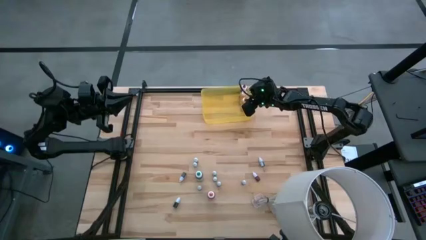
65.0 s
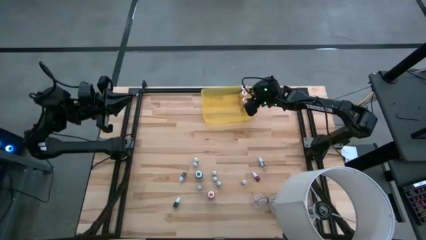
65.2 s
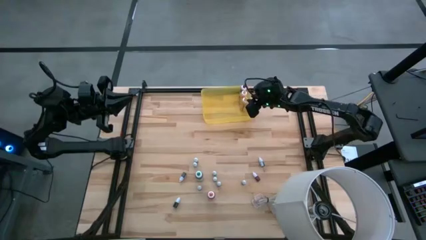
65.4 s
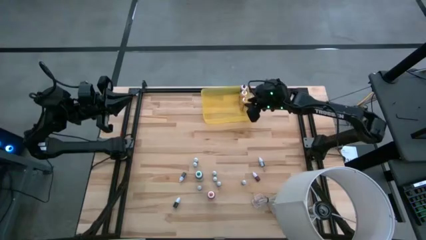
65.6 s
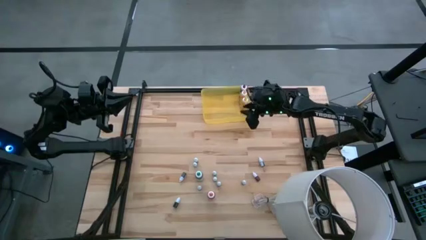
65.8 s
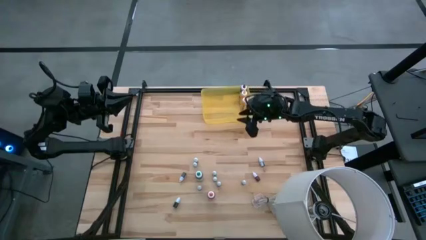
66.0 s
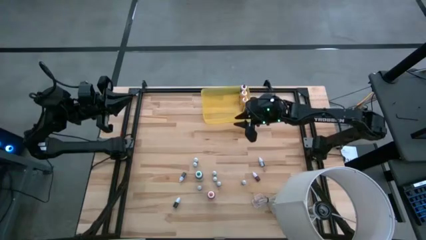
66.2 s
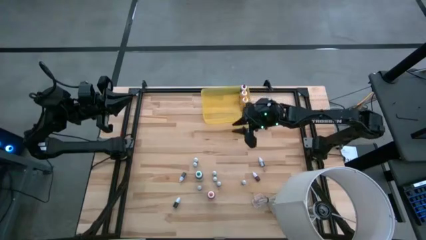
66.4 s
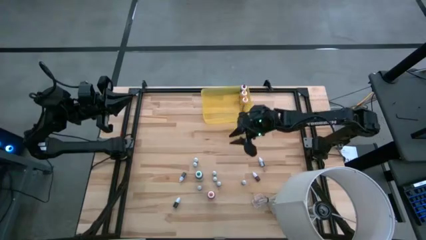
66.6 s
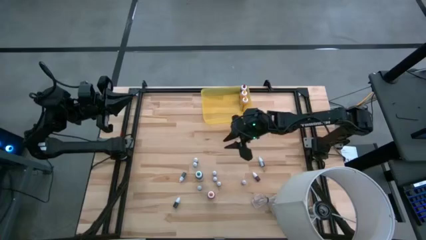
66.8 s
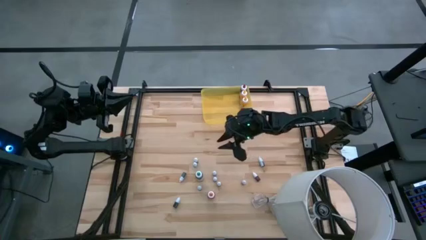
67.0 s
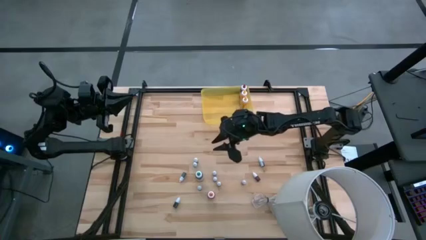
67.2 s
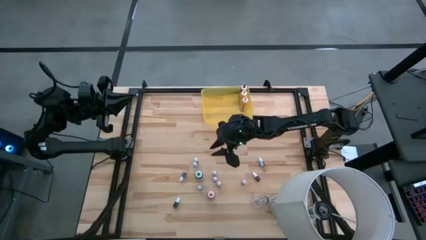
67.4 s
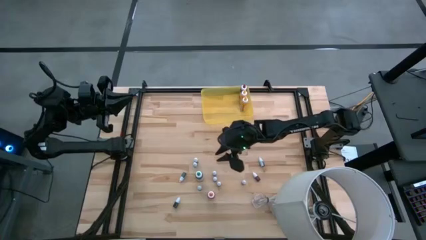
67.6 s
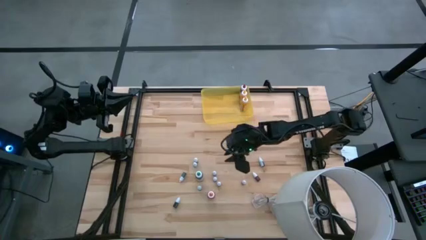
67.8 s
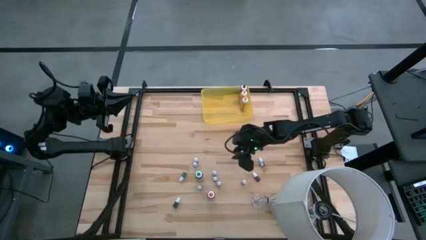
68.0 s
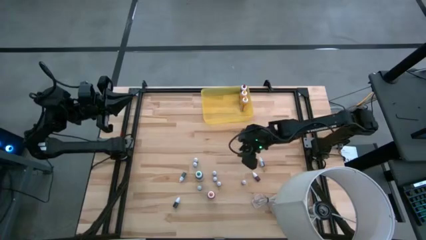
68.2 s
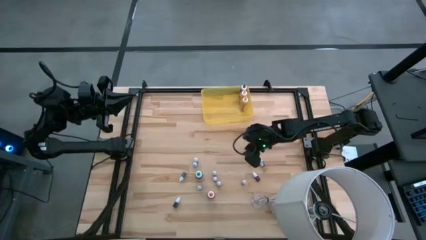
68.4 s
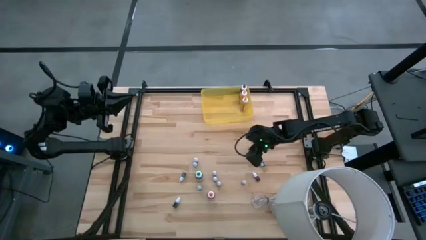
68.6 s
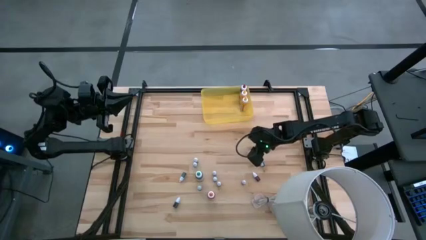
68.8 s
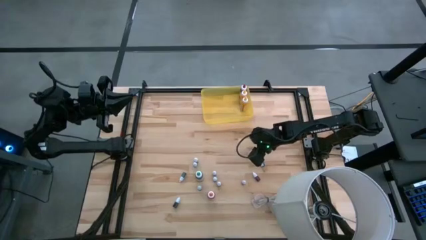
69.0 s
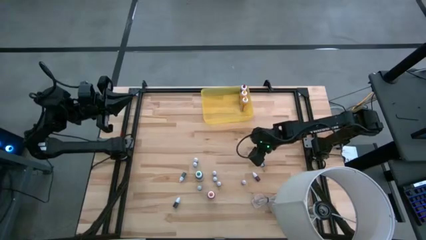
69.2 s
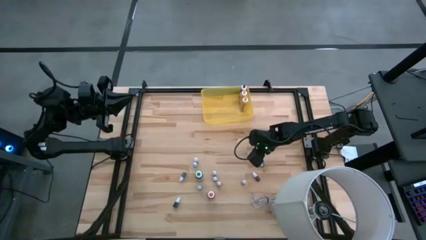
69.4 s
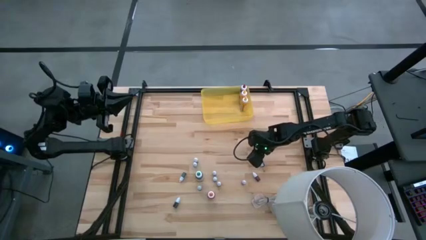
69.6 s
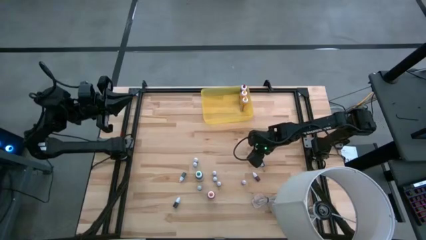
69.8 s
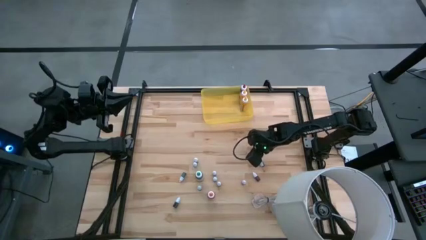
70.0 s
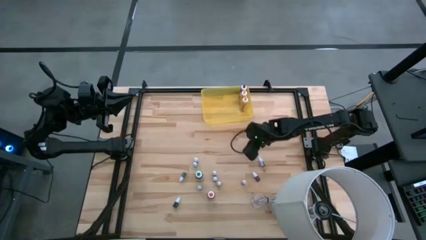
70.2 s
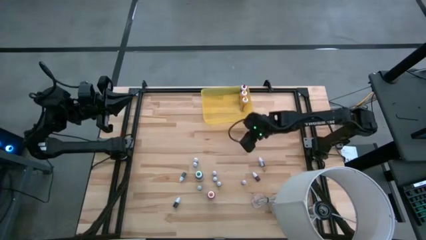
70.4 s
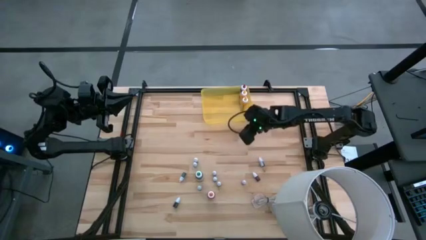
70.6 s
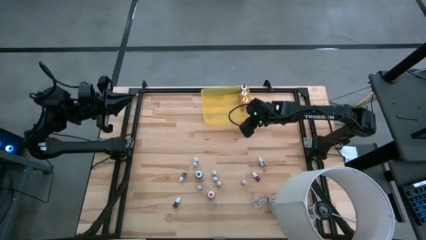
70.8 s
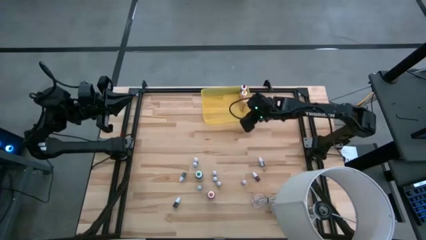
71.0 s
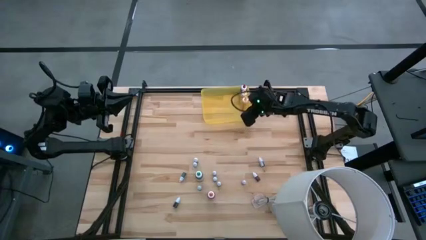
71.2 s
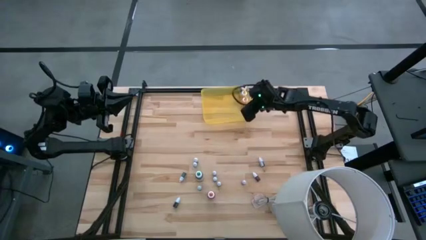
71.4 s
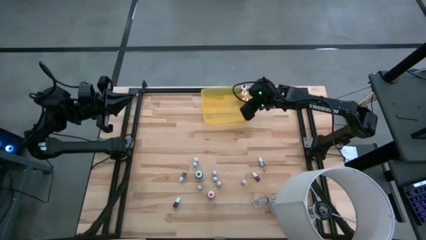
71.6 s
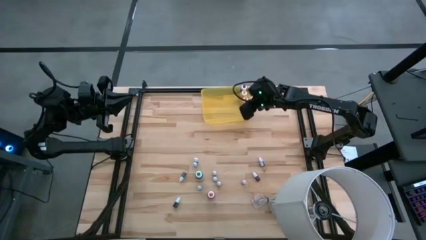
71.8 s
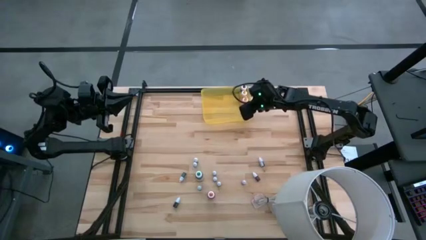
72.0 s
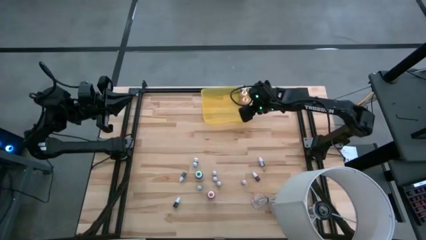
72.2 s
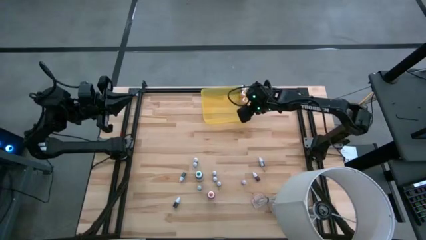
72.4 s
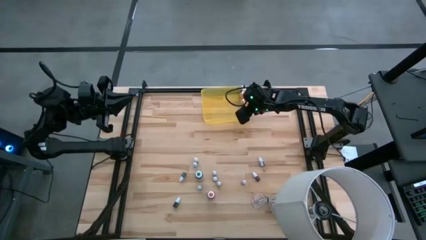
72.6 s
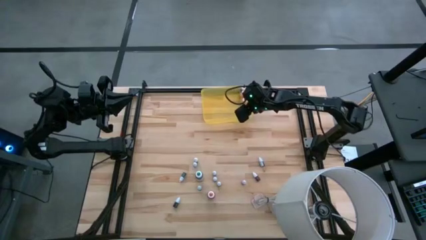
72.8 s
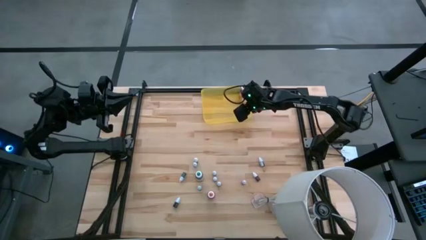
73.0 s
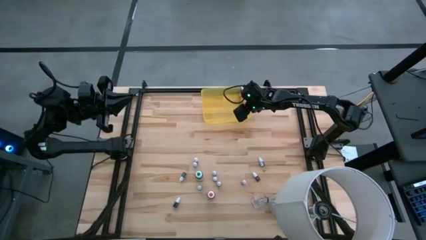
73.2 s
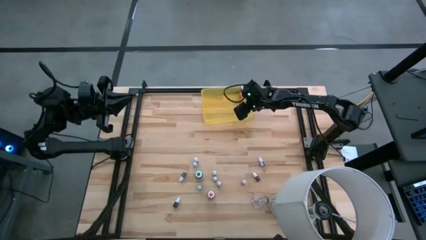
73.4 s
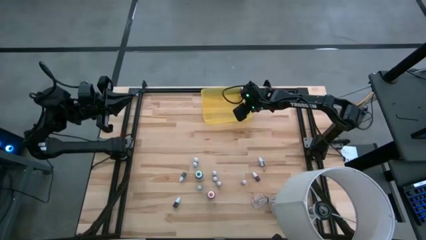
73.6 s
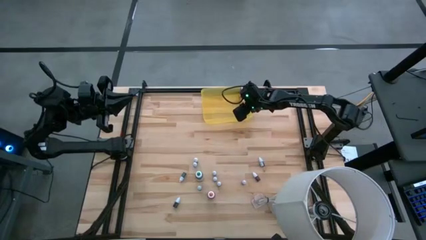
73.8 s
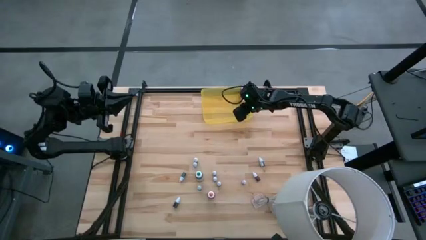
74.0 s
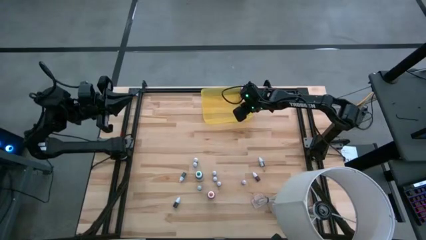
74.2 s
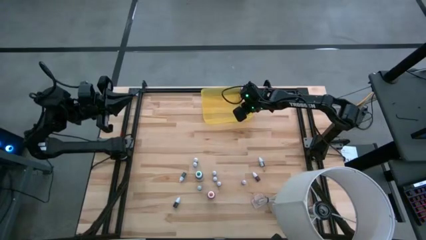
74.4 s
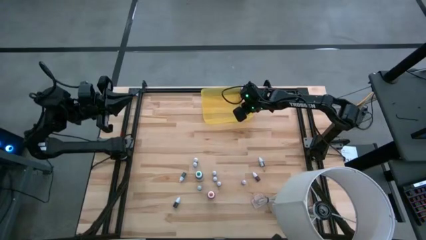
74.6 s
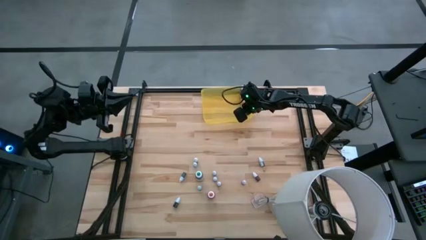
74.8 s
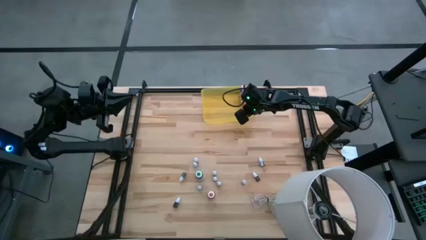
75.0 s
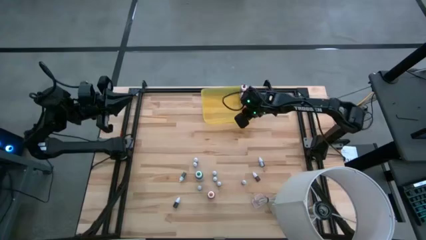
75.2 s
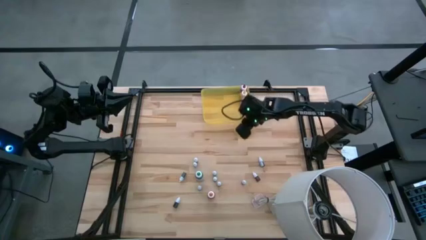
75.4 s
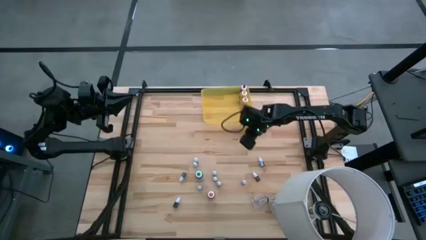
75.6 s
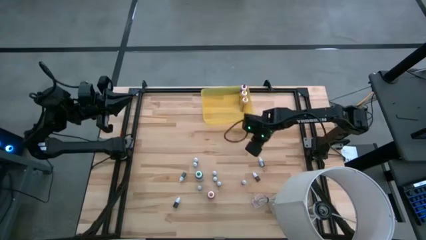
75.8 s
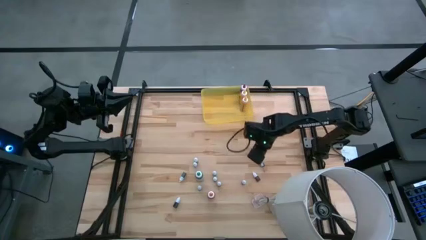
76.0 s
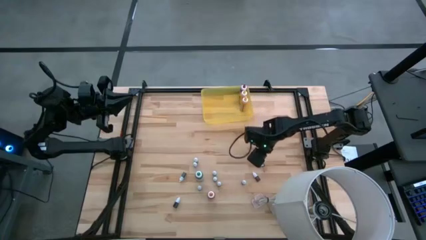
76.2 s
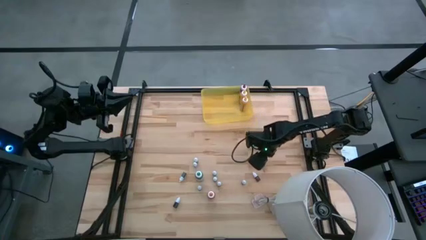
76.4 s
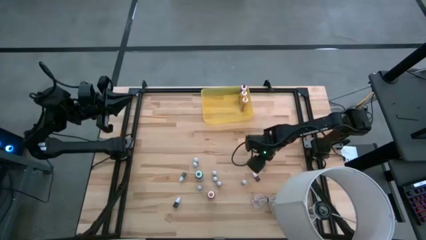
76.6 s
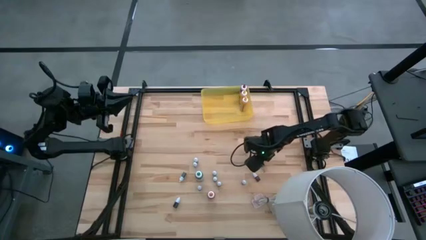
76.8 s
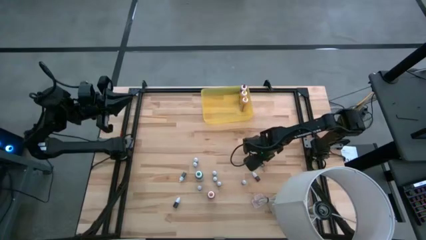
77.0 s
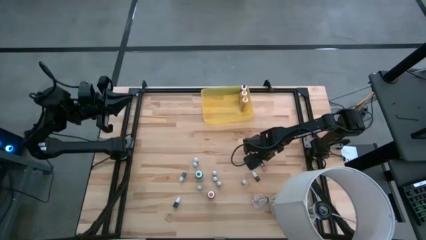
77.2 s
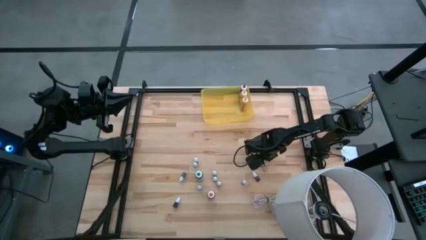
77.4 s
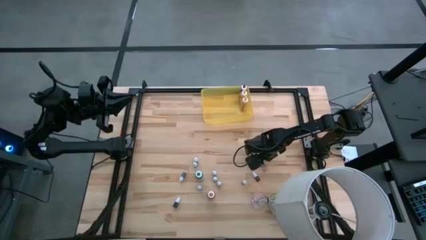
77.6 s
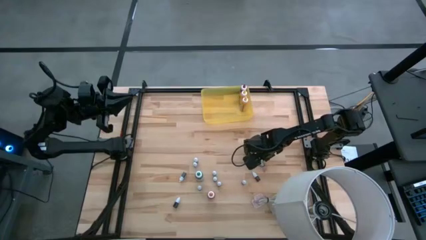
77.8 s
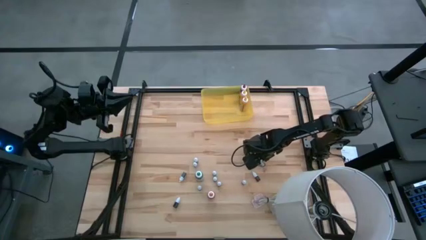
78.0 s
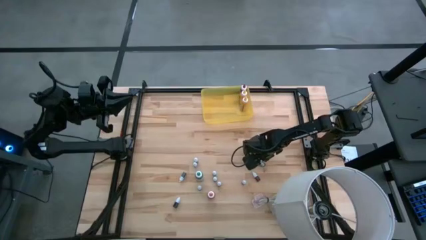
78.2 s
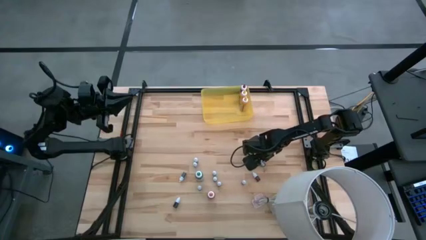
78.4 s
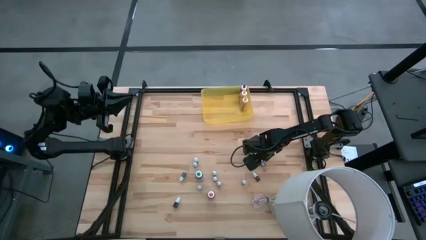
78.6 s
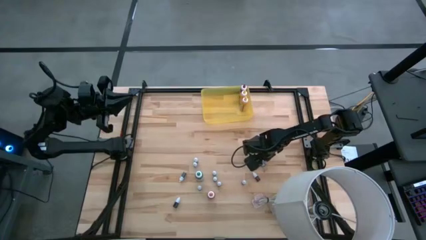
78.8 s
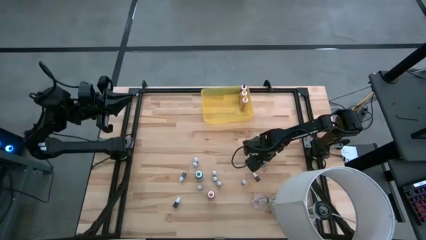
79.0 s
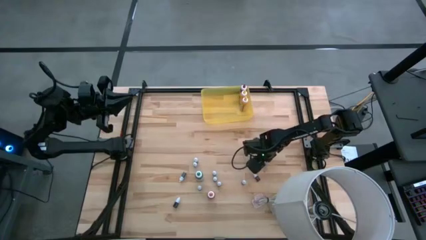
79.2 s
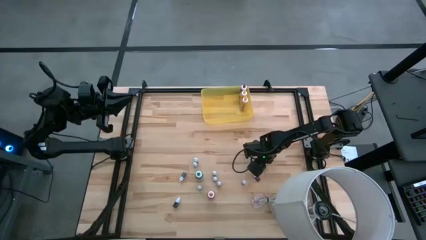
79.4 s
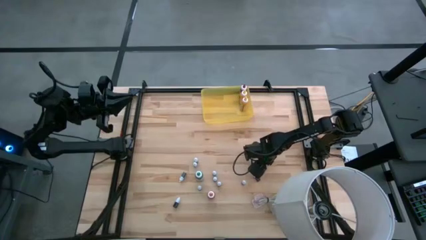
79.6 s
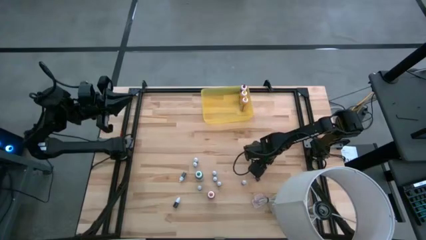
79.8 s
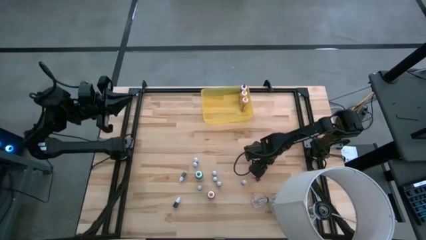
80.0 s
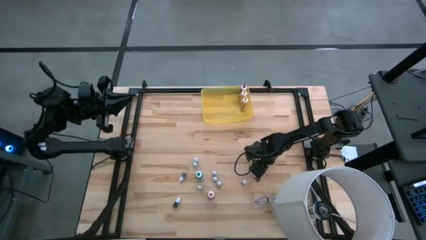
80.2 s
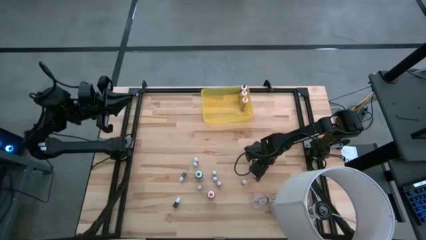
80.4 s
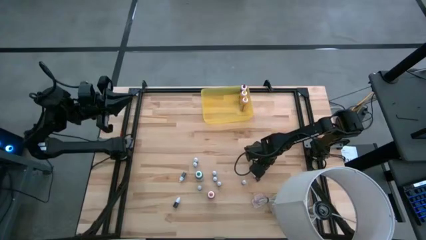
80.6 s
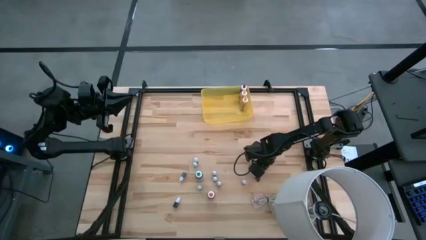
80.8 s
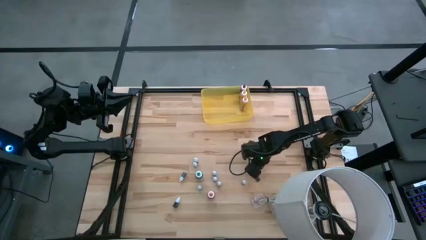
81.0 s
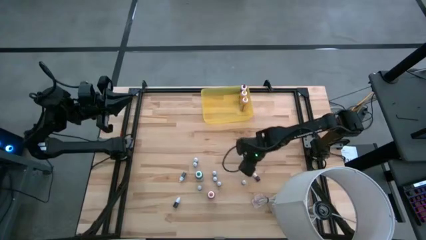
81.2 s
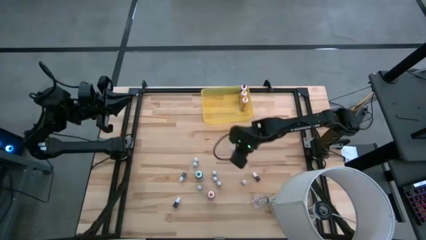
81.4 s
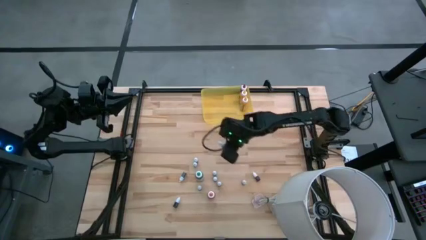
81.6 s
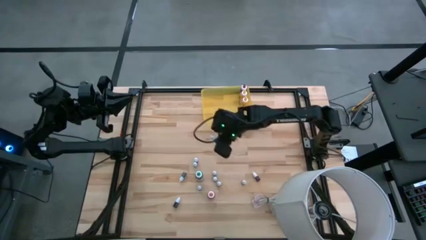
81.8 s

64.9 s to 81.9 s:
Task: Pick & Place food coloring
Put the top small black food coloring bottle into the yellow bin
